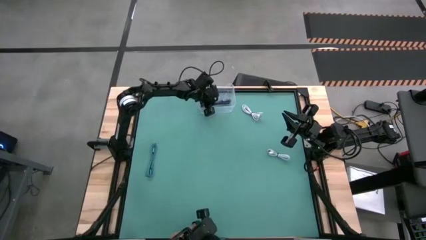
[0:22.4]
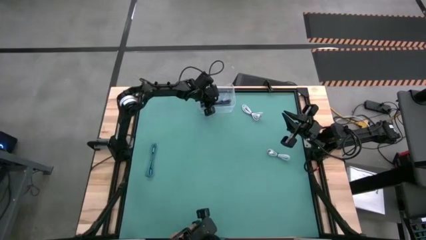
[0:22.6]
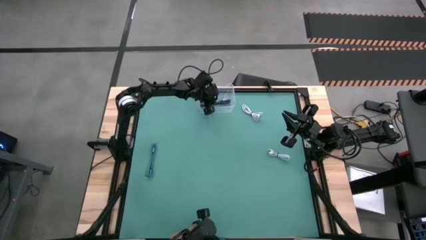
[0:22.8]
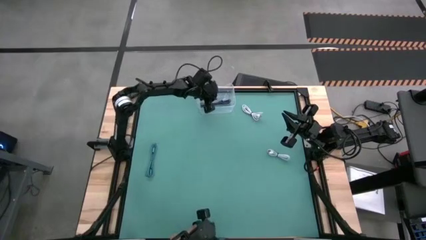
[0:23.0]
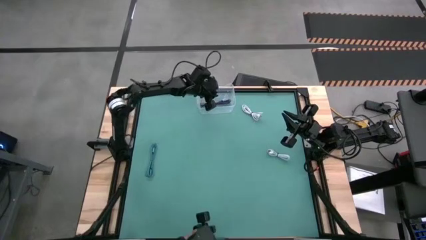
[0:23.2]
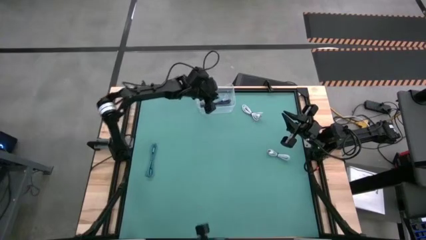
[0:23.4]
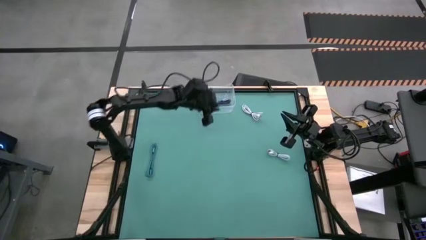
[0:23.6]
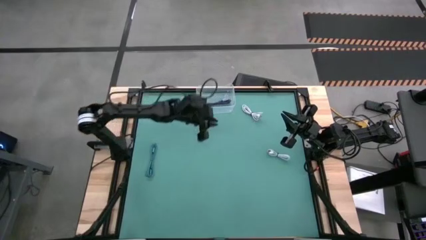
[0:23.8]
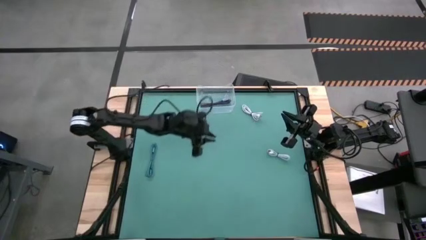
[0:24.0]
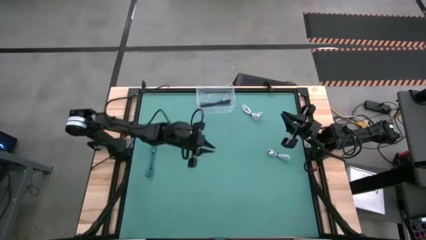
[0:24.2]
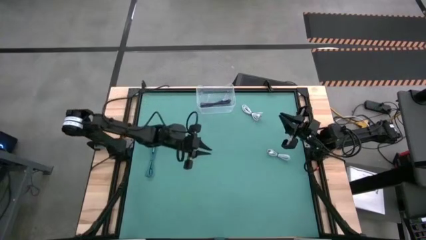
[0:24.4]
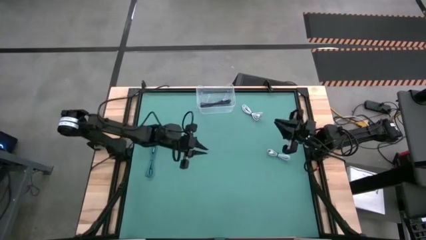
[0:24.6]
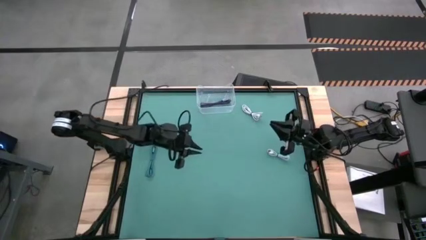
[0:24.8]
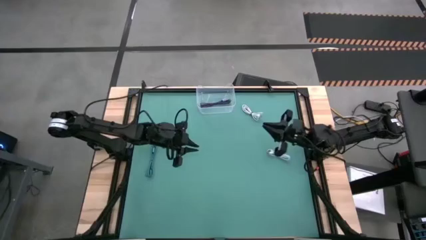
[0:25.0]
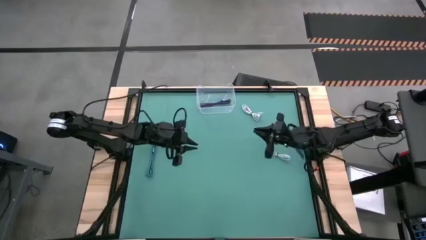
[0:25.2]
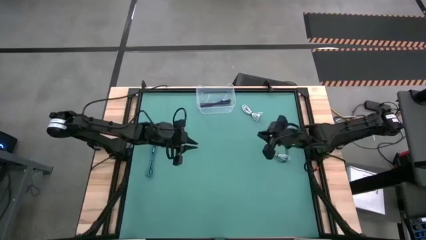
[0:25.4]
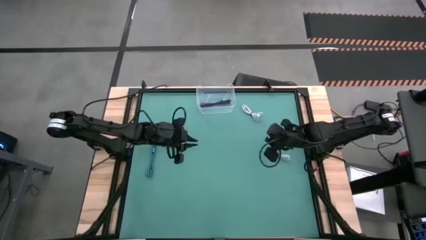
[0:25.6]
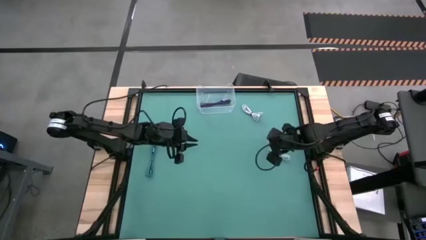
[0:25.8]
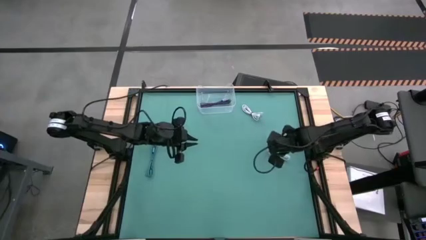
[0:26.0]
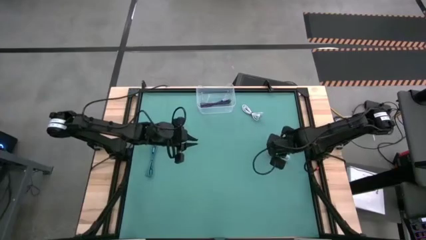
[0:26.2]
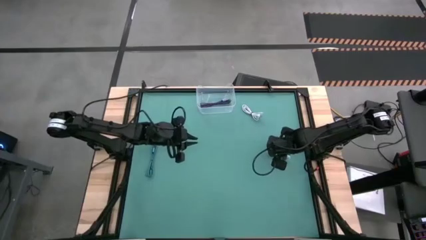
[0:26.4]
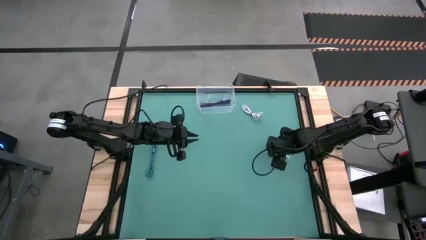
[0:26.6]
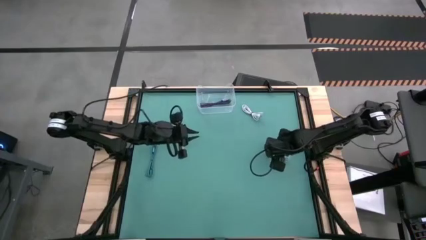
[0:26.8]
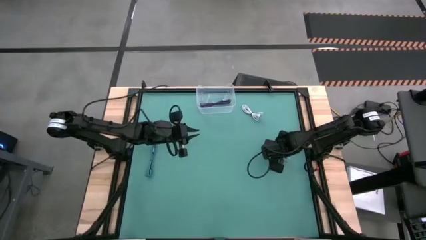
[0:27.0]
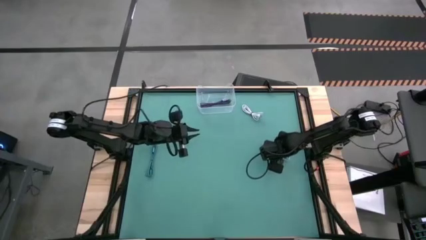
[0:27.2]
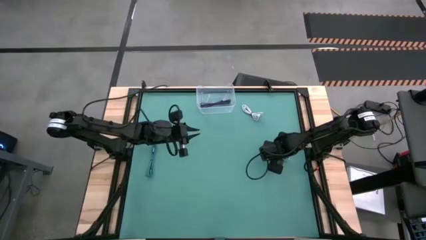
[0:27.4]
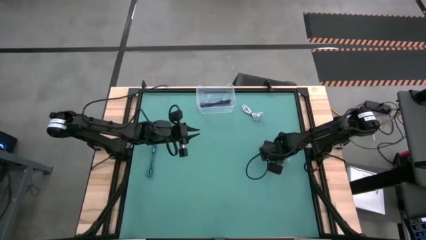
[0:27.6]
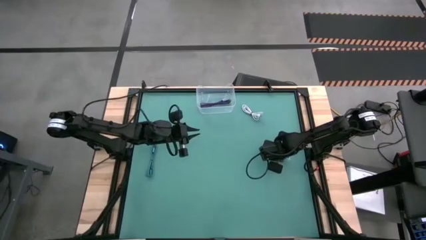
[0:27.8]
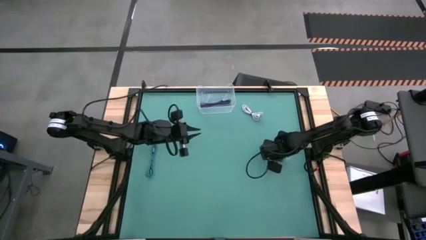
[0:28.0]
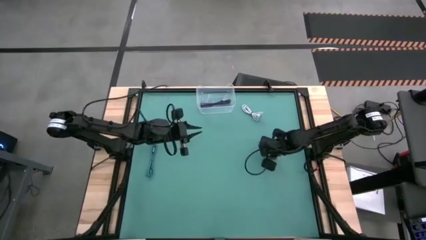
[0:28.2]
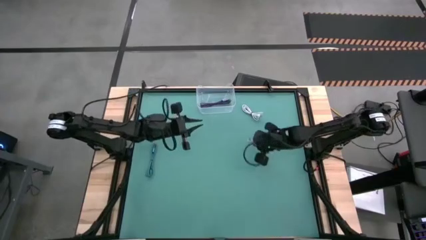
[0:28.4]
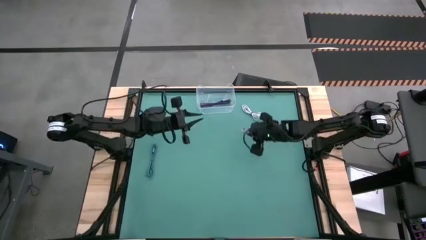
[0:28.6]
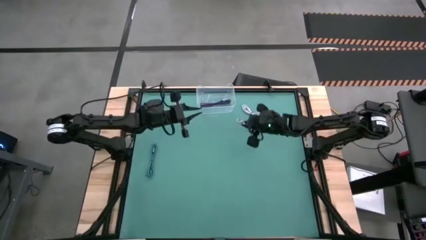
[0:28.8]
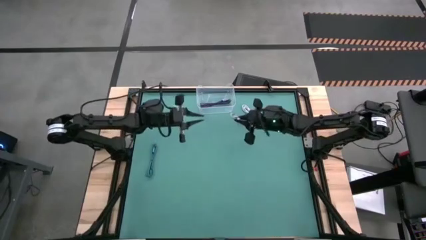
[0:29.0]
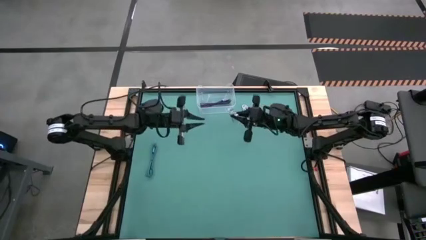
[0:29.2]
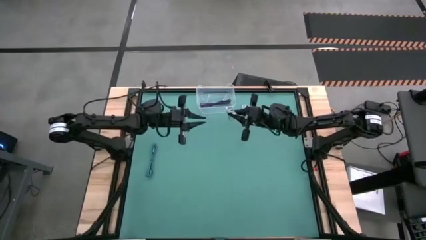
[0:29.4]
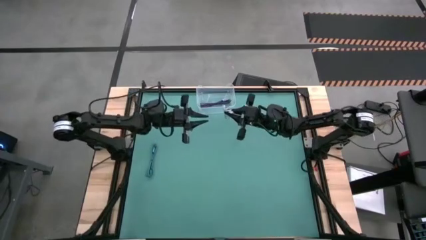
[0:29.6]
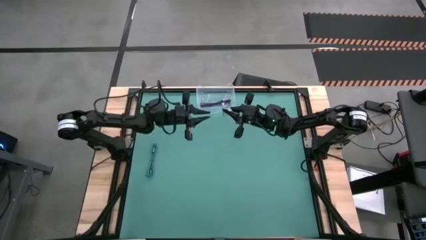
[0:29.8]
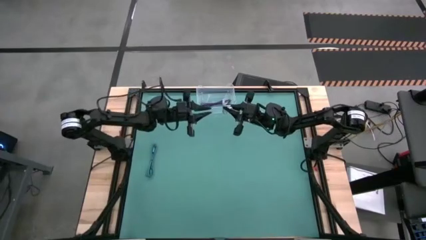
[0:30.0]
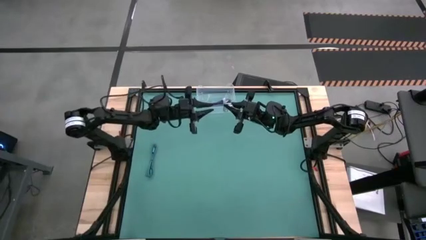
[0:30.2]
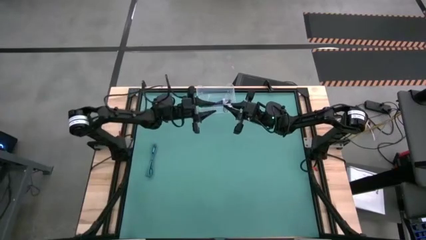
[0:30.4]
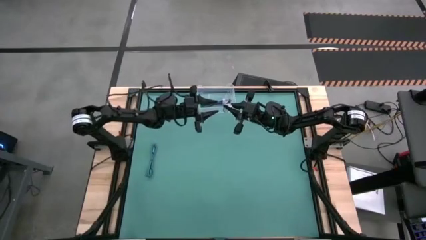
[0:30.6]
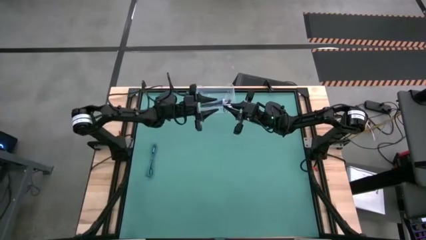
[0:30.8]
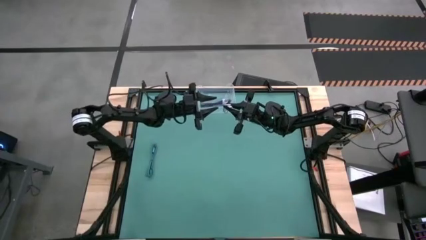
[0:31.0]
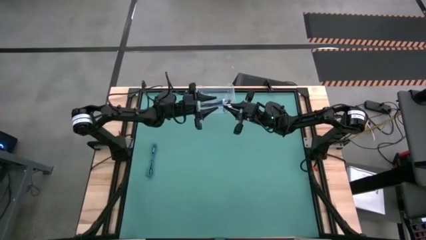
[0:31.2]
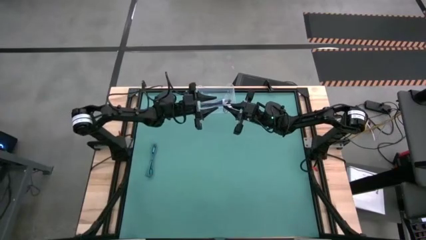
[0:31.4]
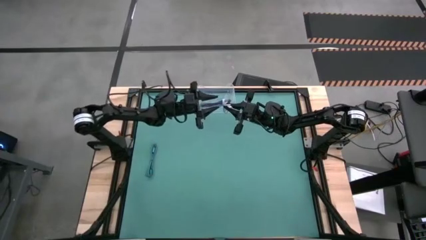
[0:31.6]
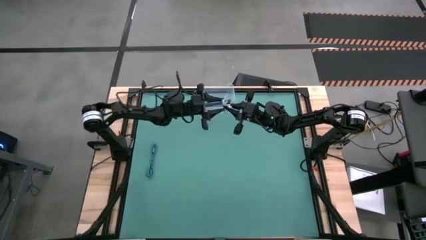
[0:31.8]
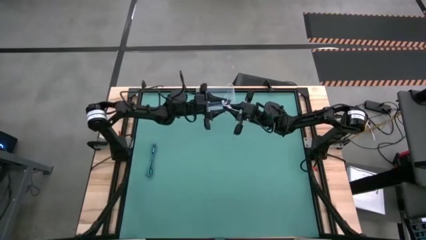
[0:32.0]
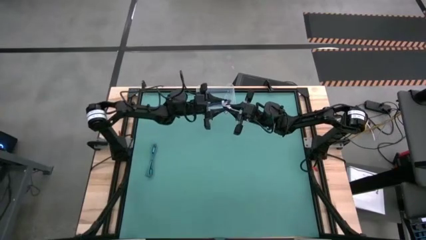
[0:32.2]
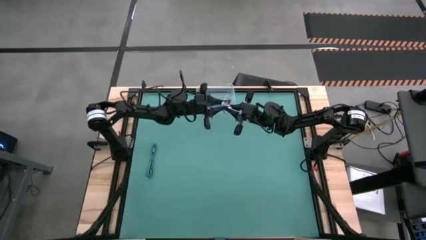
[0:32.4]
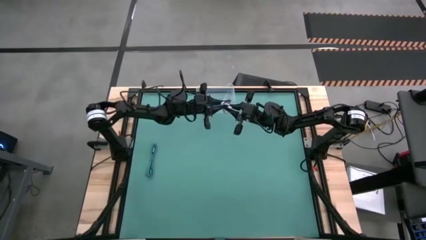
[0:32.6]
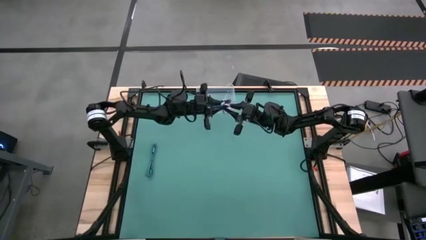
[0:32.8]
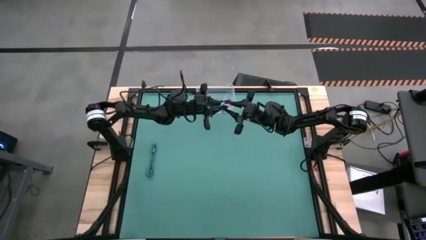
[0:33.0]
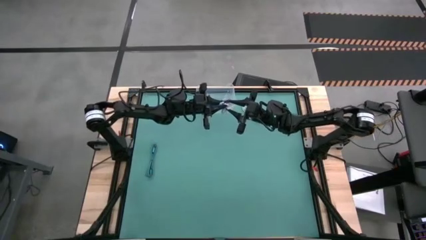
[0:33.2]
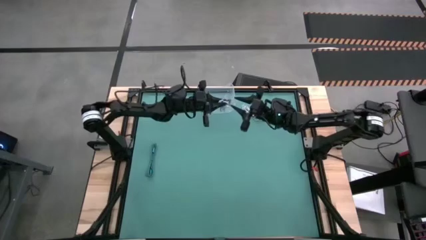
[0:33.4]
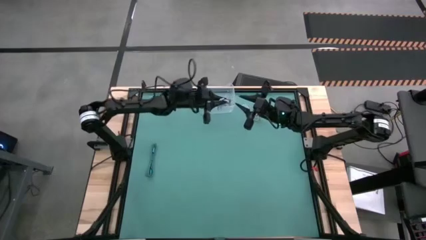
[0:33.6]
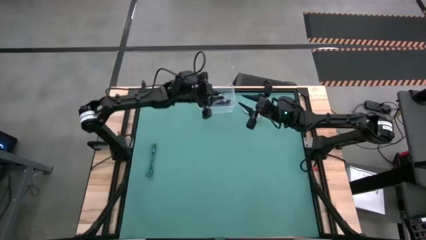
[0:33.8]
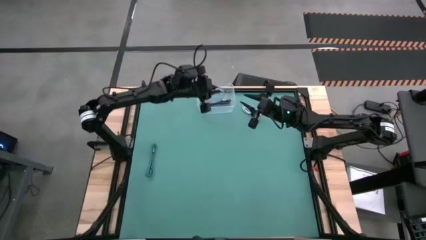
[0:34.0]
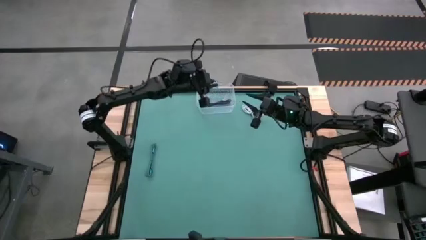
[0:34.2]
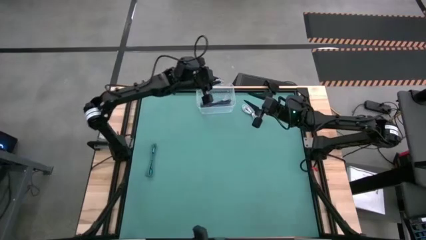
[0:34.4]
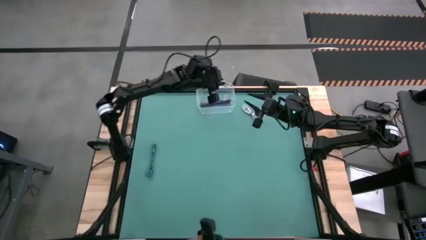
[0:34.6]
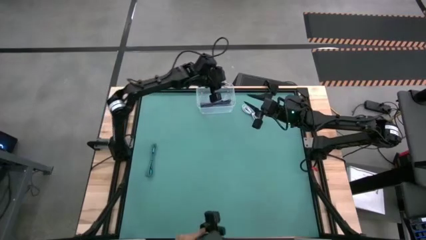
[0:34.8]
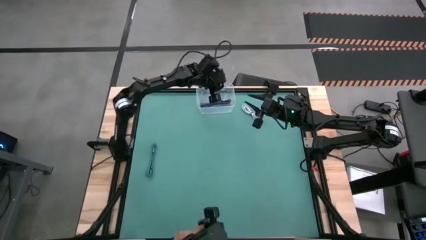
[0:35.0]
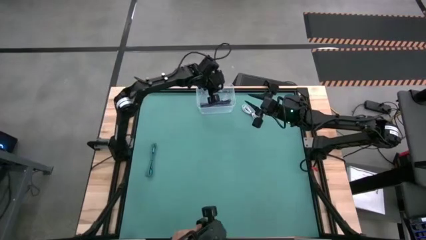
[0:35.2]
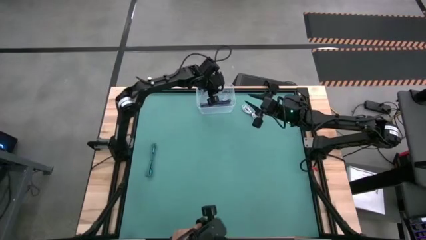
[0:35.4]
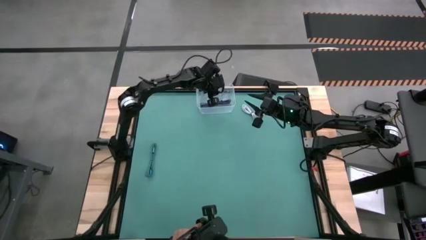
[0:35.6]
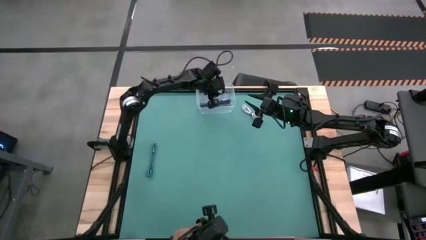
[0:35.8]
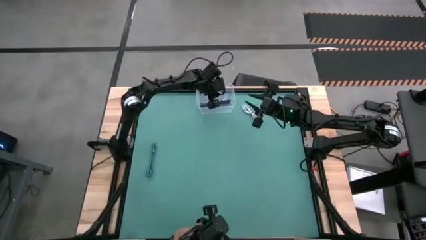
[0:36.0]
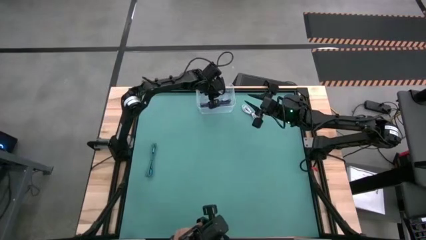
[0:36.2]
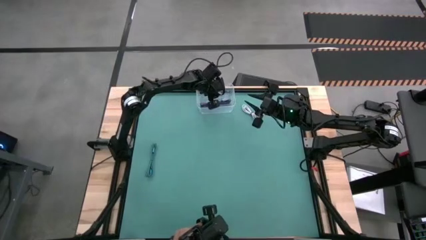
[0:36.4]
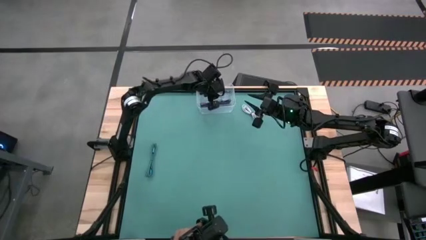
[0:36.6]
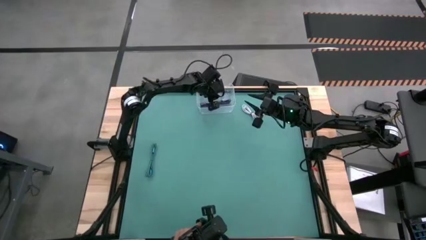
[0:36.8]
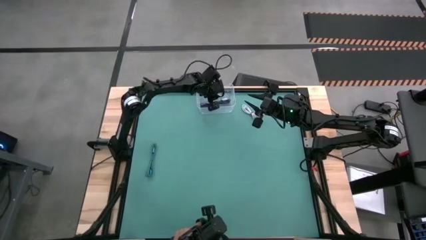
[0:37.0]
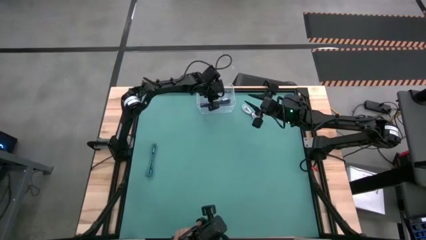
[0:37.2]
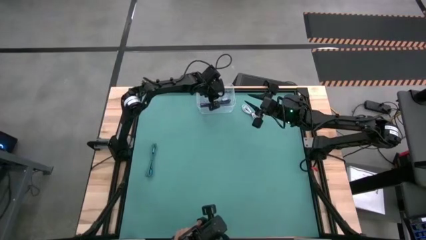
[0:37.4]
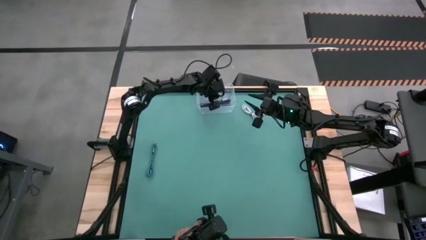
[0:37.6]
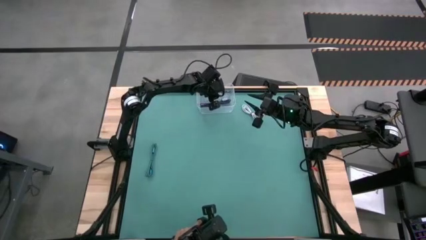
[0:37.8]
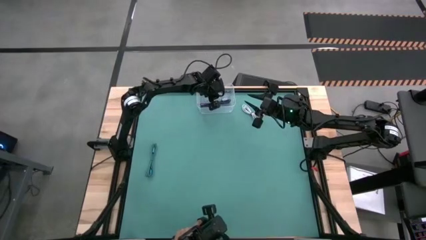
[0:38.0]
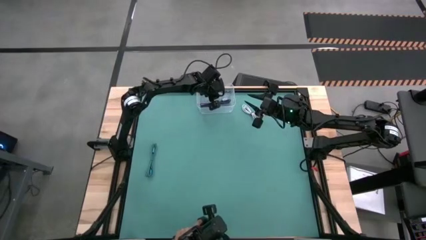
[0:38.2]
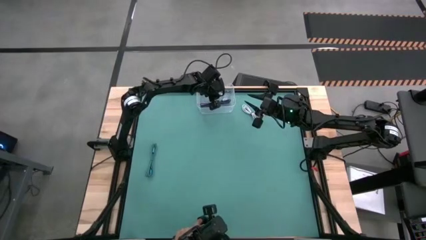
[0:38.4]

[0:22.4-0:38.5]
Task: Pick and place USB-C Cables
Put the bottom right white charger cable into the transparent bin
